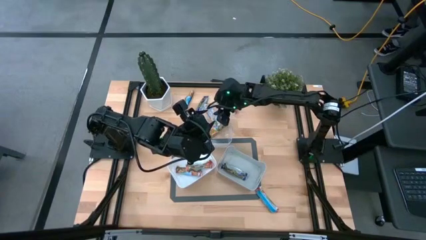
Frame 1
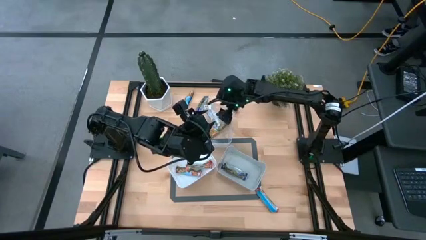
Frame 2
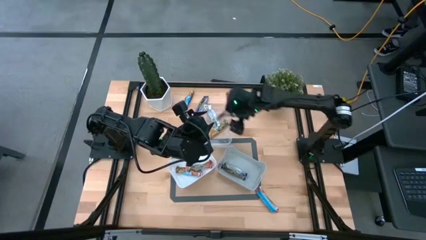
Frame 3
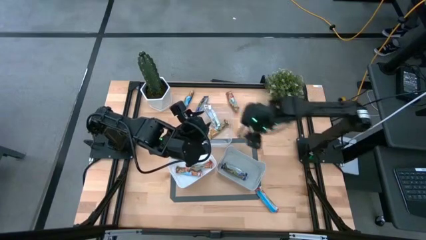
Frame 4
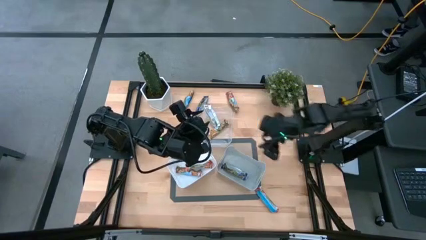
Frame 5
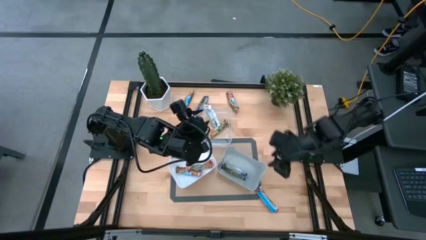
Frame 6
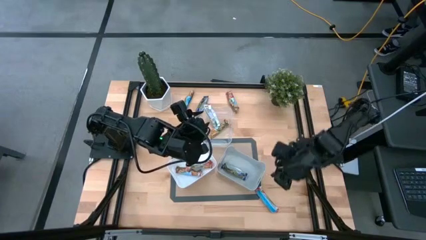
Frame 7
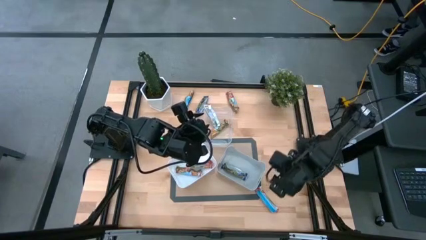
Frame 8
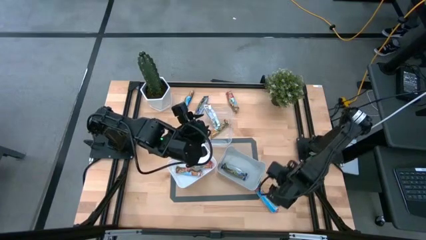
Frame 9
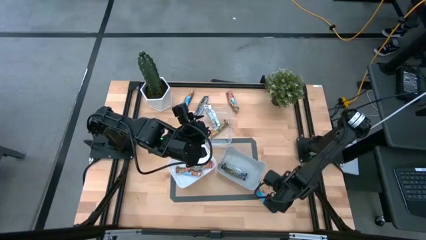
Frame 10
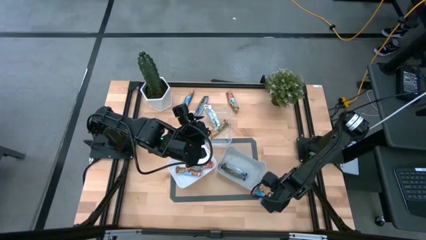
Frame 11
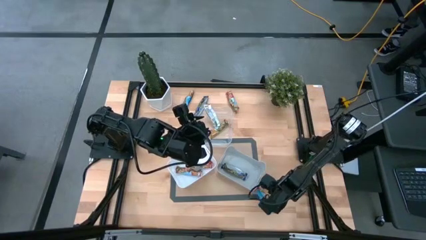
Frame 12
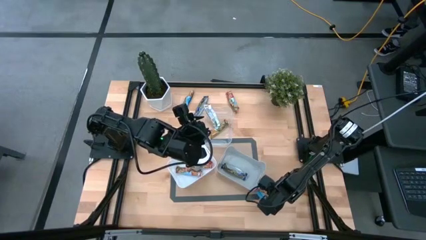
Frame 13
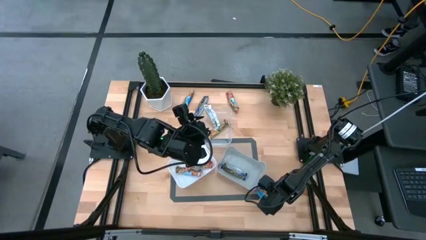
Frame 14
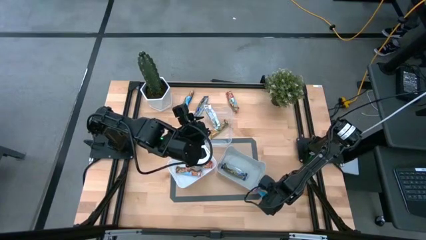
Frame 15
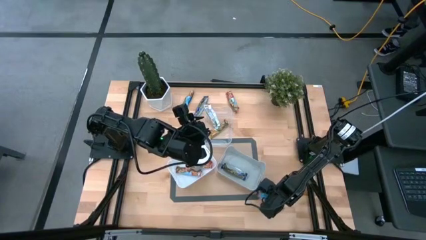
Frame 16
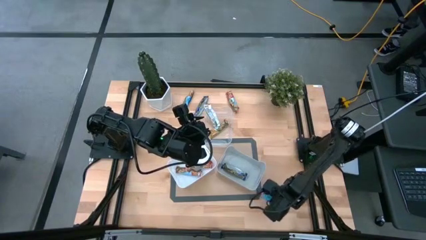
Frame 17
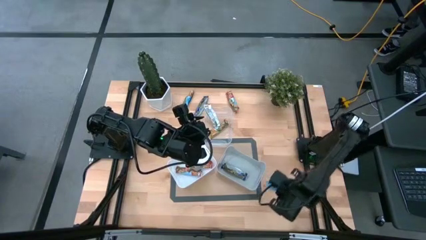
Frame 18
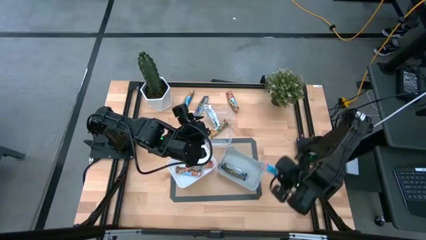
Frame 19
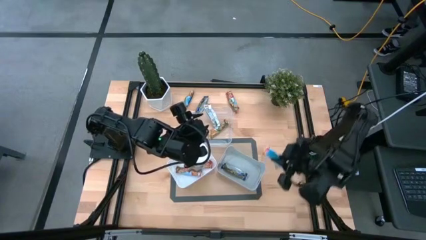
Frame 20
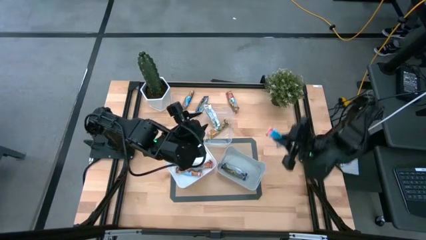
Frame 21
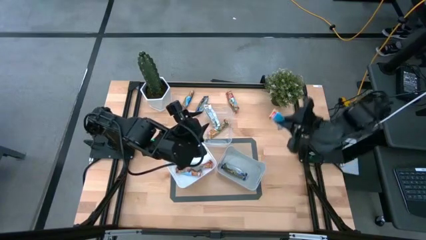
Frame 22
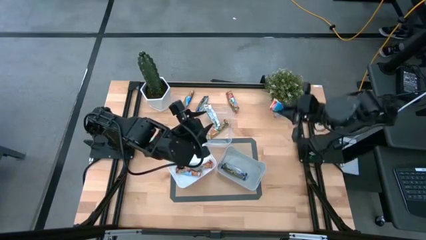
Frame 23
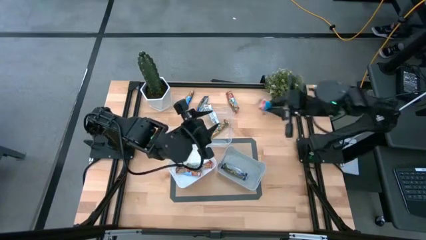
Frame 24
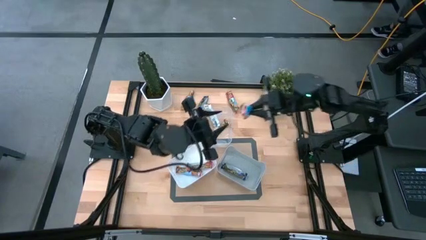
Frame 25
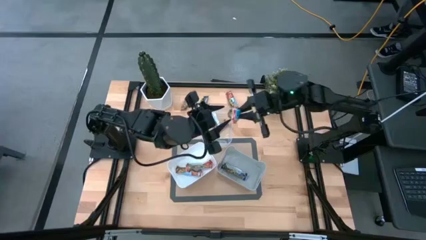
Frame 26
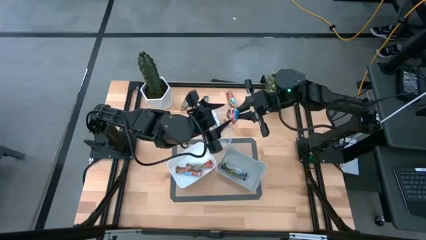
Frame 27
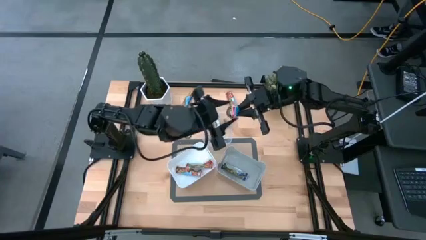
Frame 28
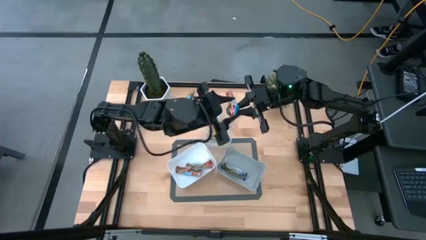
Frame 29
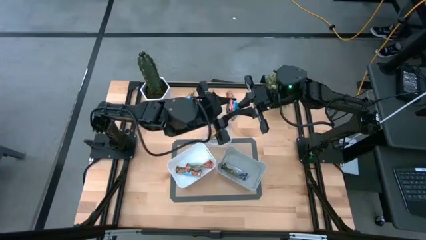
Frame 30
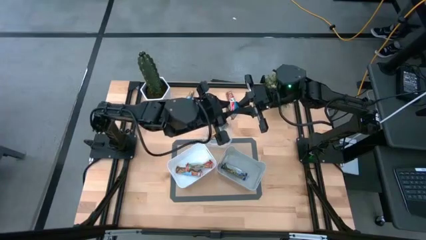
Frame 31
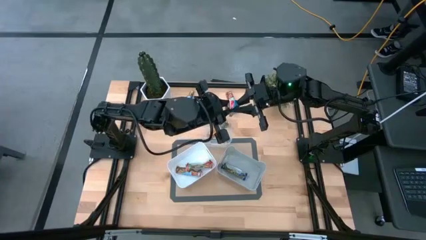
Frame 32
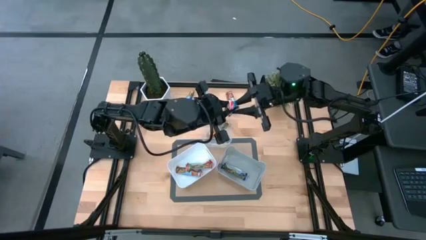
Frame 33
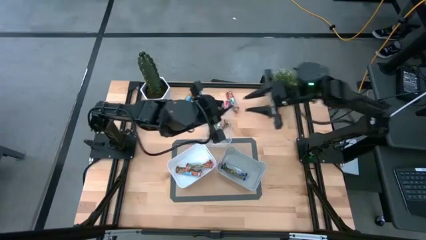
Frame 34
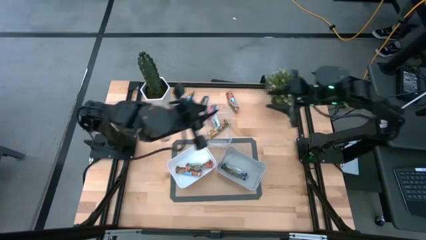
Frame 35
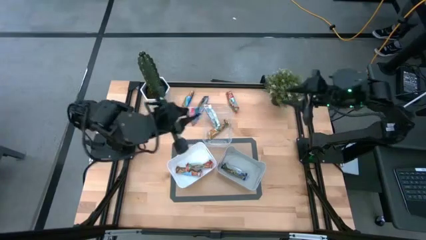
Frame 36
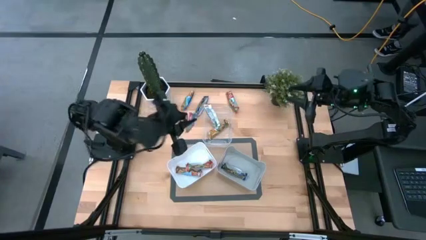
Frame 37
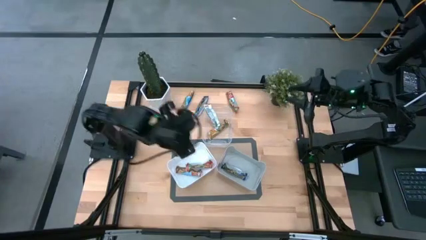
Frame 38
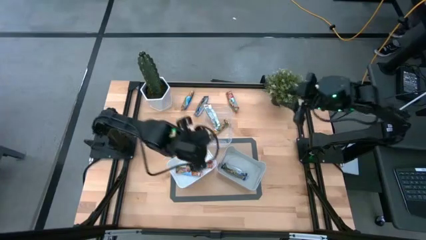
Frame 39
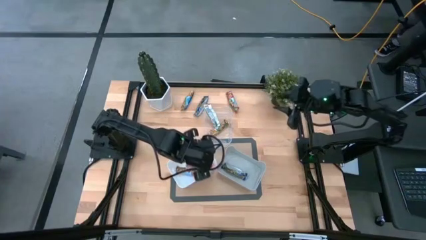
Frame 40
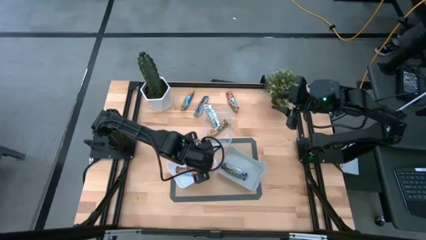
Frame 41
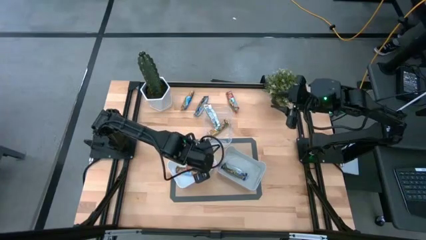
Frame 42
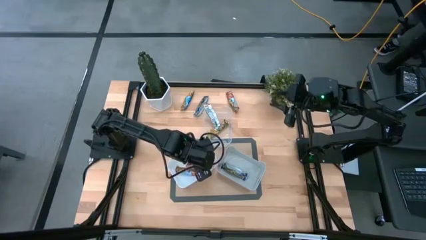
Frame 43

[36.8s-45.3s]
Task: Pick and place Granola Bars by type
Put the red granola bar into the white bin

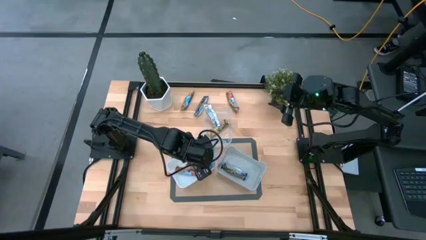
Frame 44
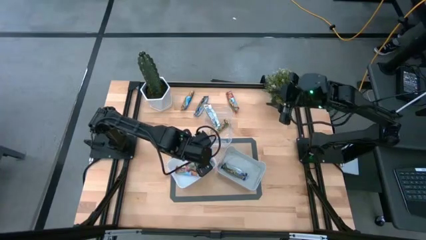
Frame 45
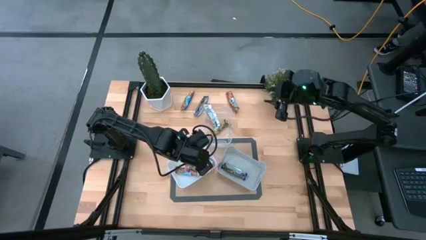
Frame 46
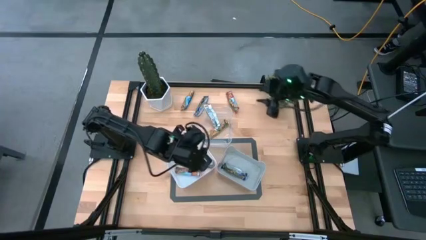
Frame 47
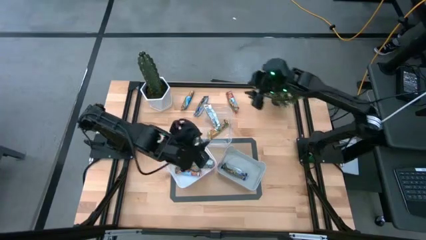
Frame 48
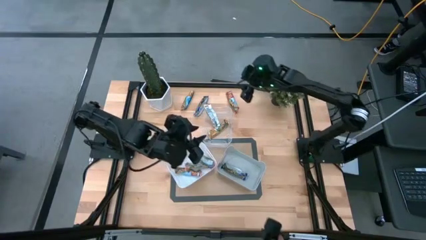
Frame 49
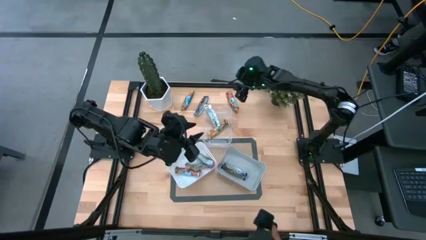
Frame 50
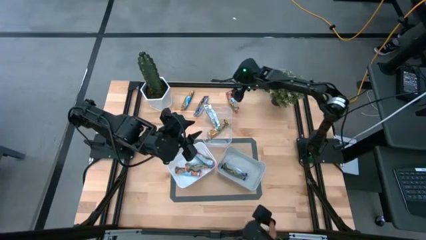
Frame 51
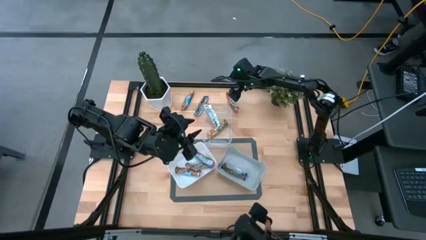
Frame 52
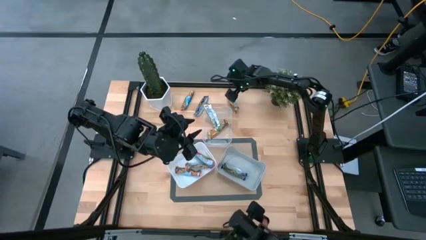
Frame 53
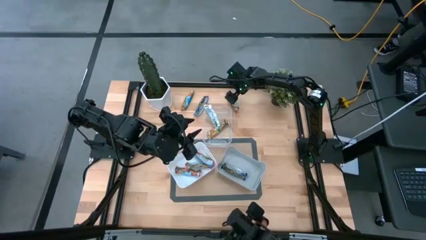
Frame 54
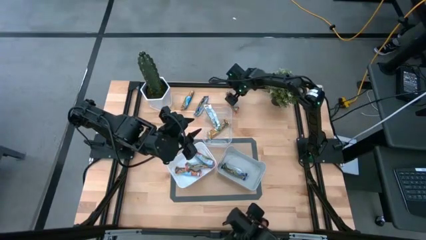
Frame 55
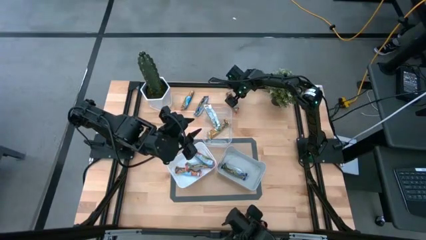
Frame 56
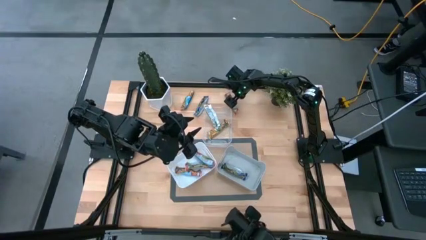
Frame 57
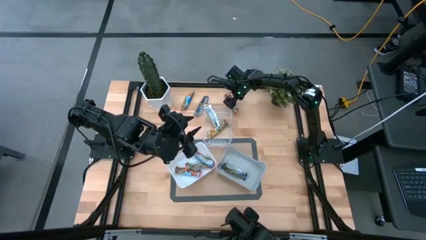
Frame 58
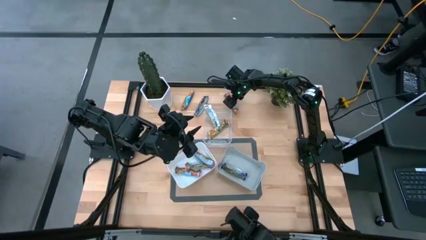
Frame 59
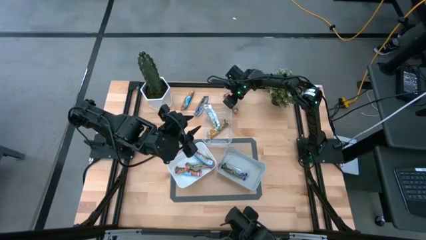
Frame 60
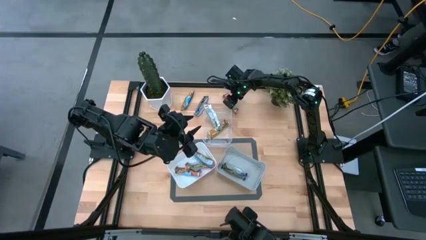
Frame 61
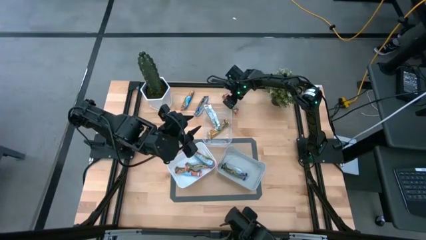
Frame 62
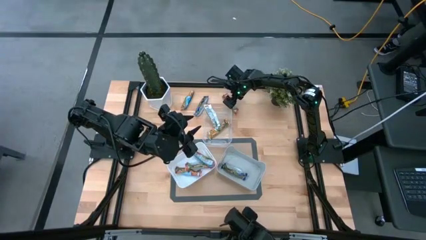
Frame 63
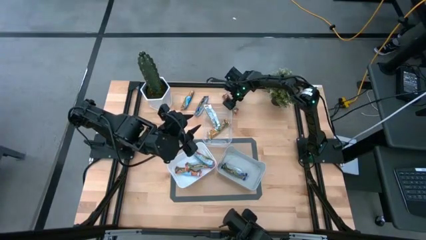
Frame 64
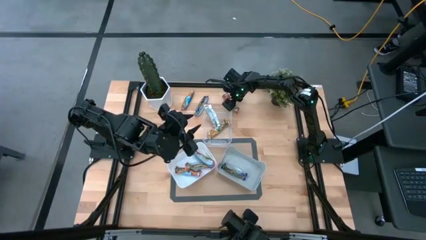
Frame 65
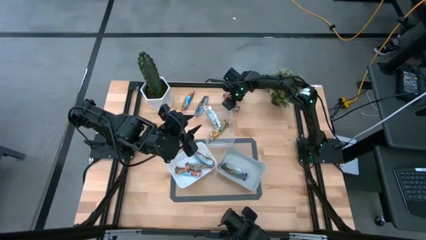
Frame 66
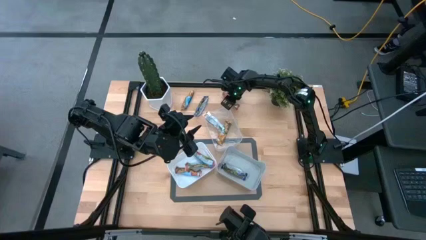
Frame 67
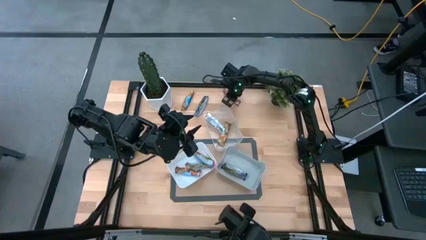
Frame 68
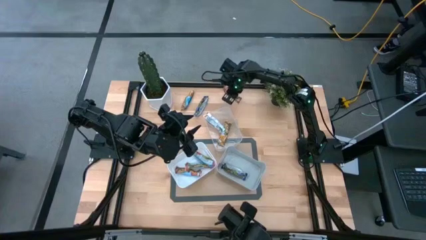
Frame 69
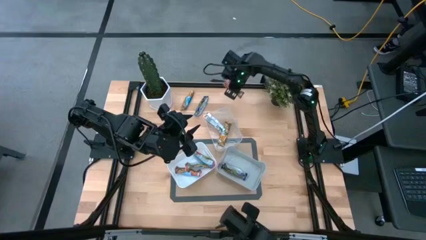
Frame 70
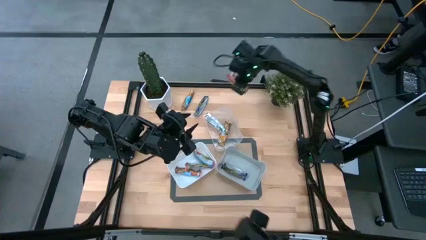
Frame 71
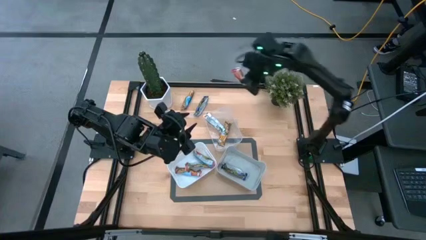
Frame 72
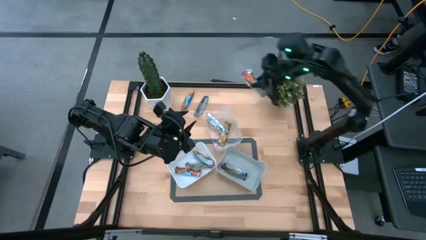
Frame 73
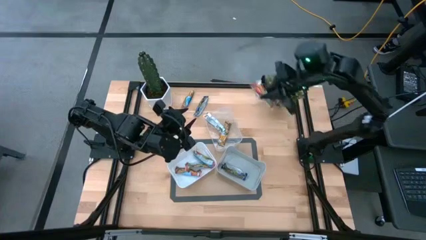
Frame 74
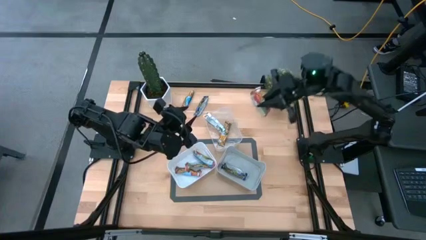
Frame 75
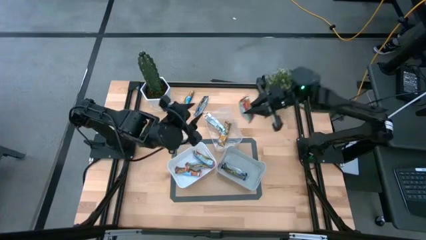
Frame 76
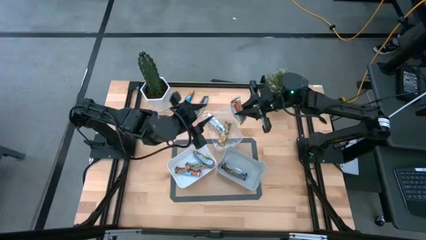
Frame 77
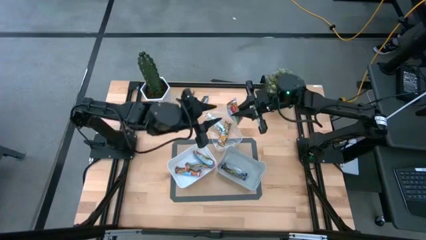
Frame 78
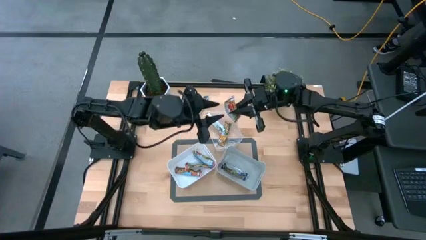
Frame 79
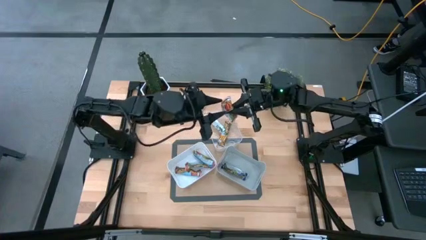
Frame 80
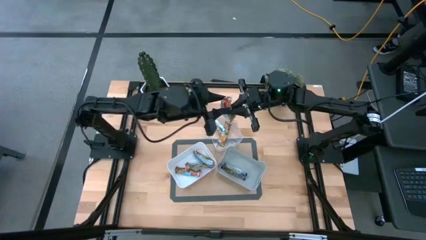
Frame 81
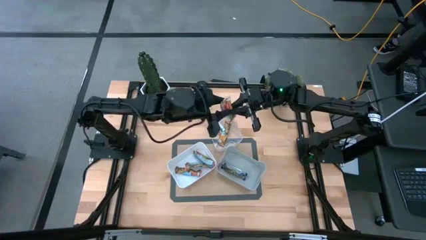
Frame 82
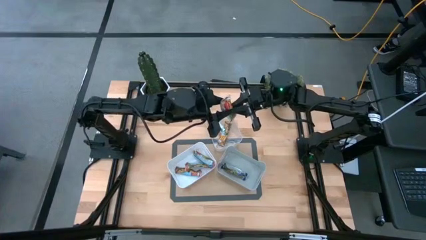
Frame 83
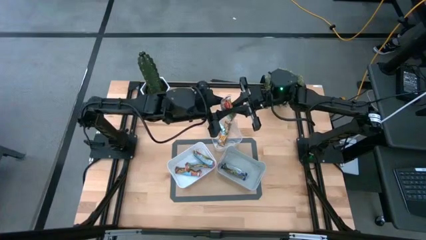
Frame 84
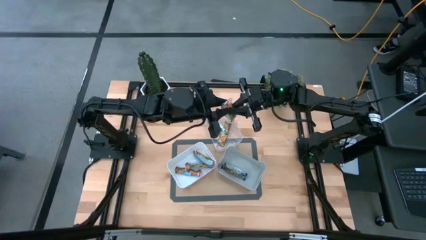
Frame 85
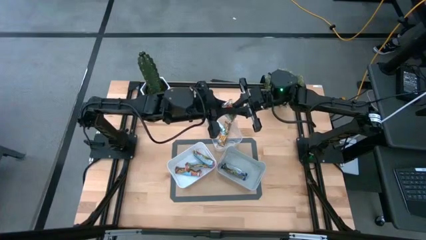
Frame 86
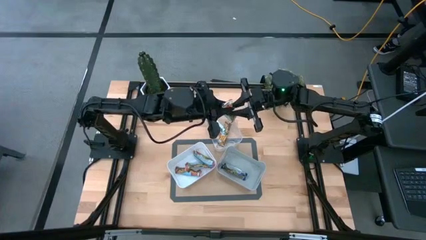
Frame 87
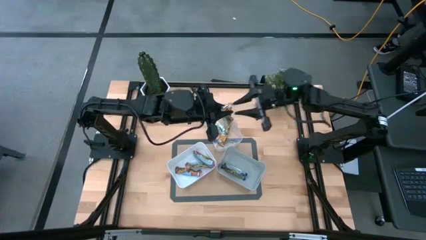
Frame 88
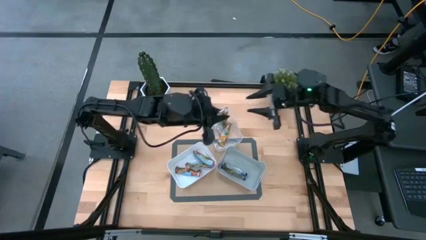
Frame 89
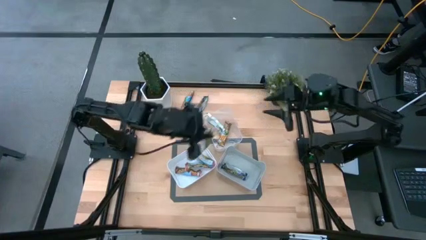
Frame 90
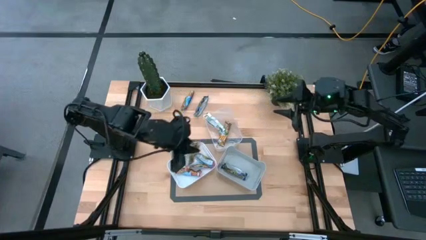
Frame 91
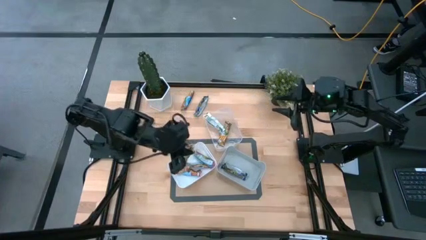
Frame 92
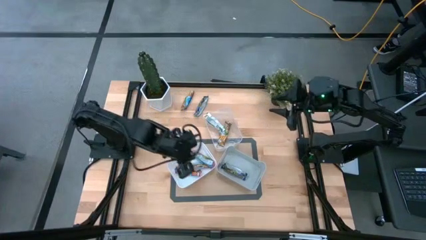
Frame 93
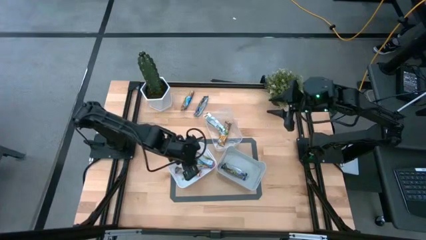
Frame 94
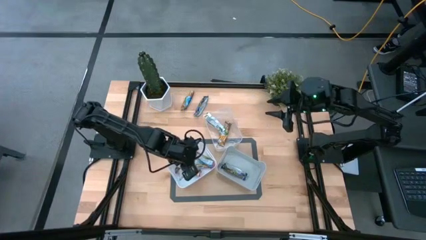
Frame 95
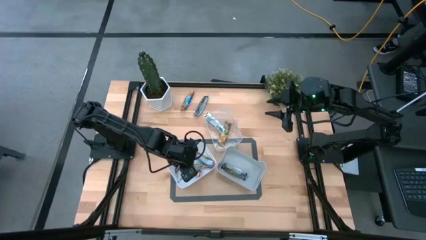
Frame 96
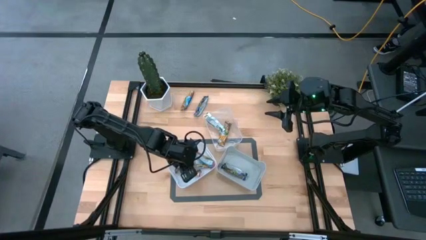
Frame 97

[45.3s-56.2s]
Put the red granola bar into the white bin
